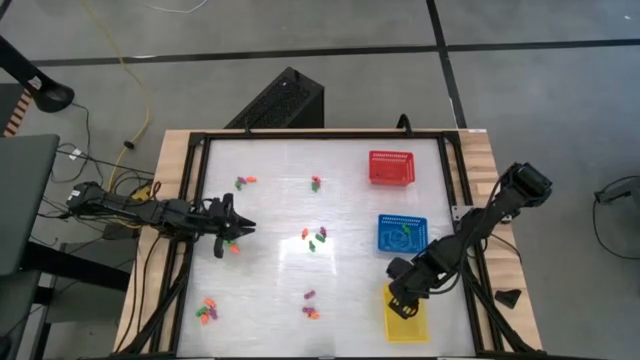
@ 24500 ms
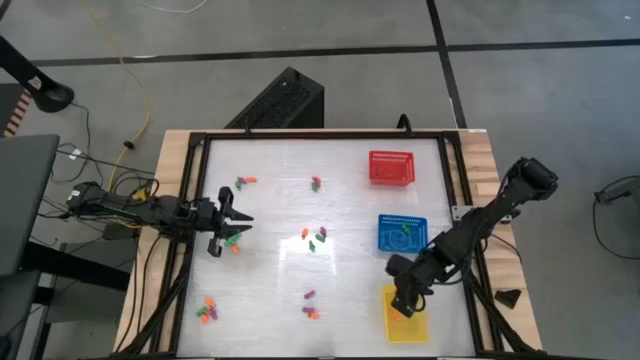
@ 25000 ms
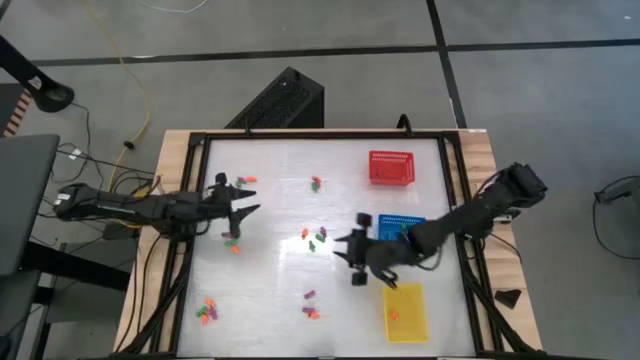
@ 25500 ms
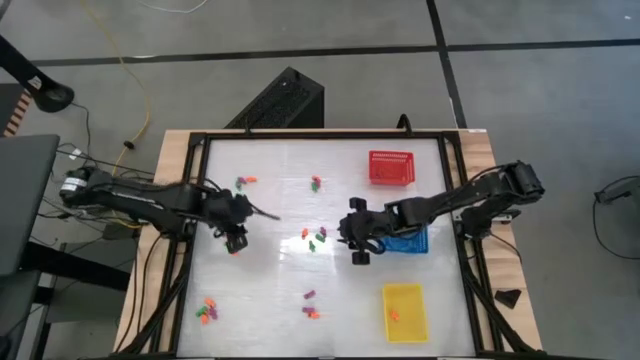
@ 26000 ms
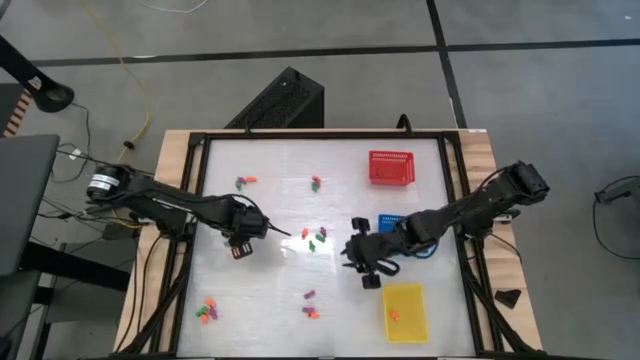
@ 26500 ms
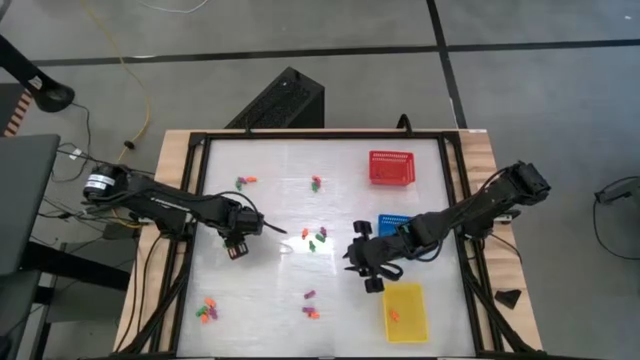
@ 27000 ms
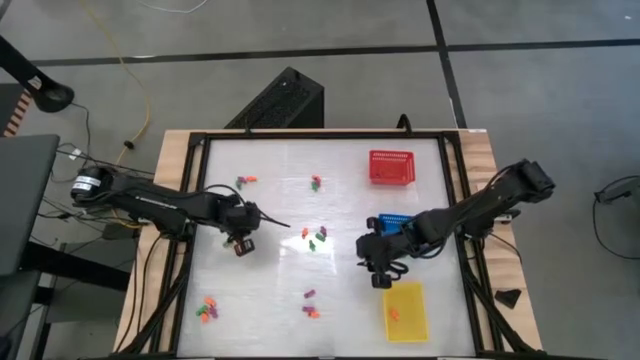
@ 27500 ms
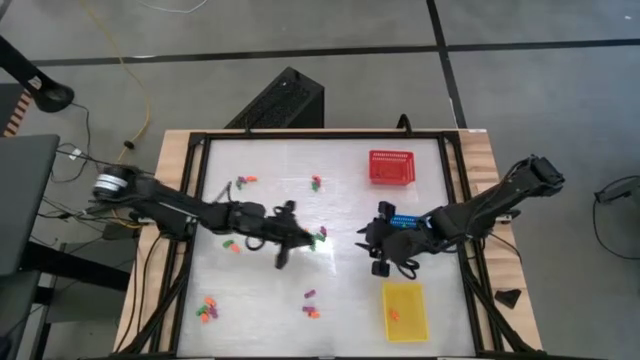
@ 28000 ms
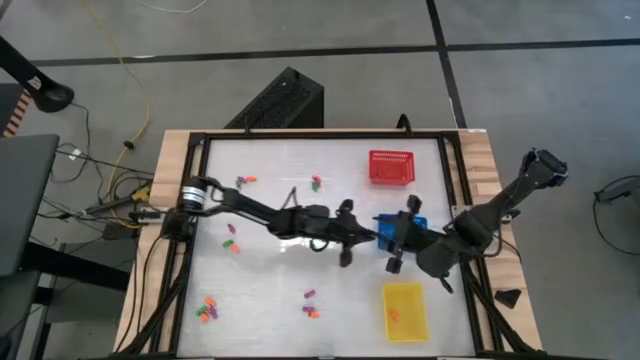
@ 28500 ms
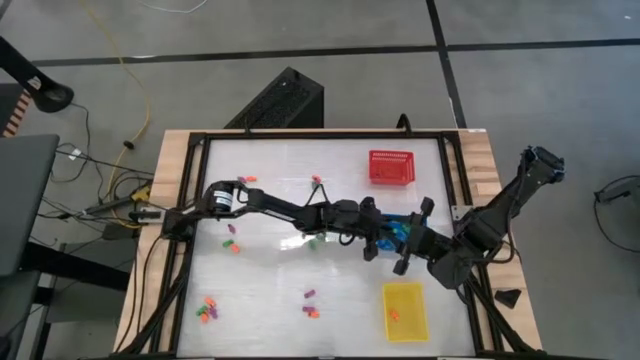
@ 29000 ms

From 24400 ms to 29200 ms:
Task: Sort Halloween decoration
Put the green skeleton toy into the blue basket

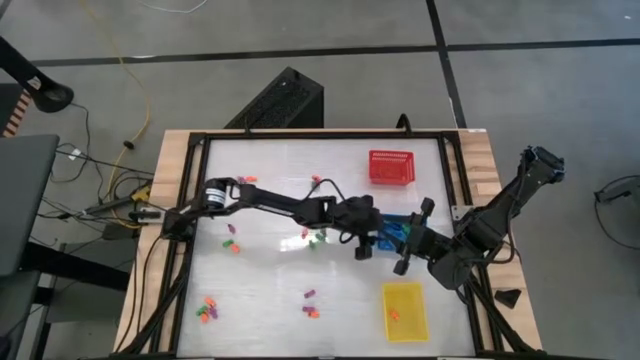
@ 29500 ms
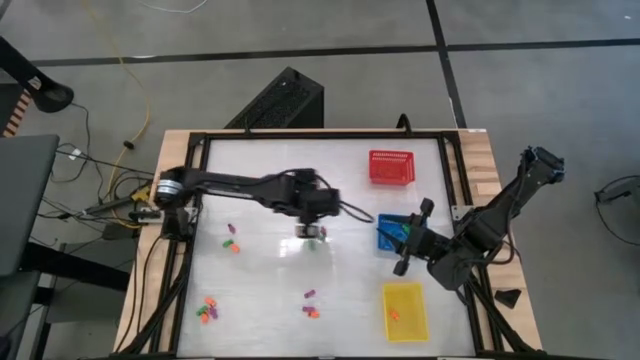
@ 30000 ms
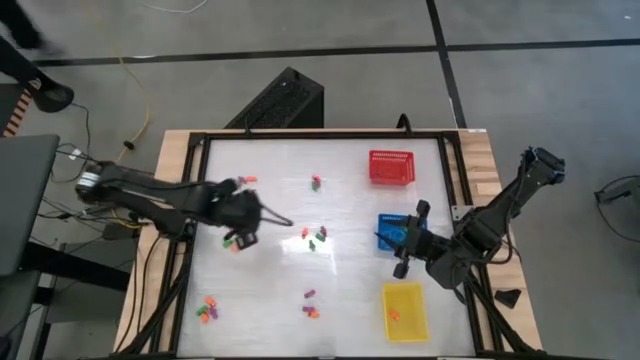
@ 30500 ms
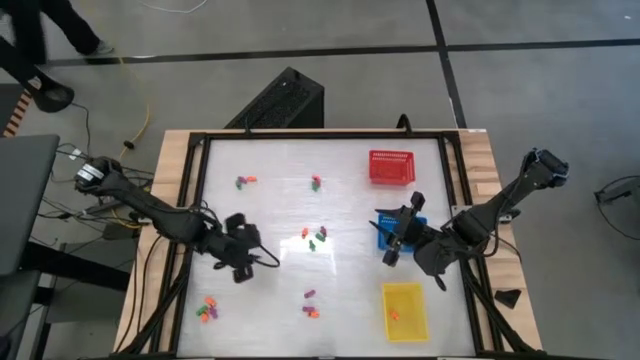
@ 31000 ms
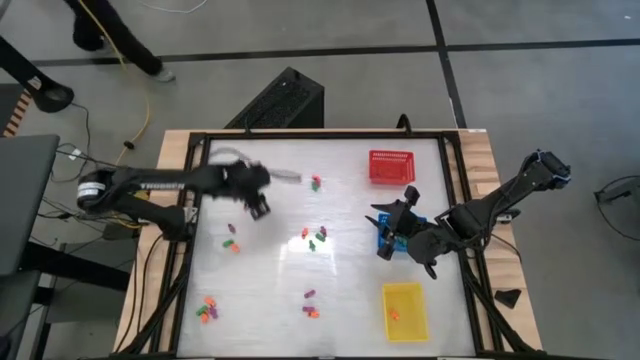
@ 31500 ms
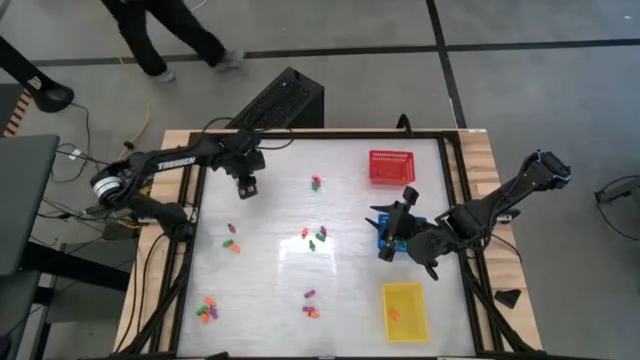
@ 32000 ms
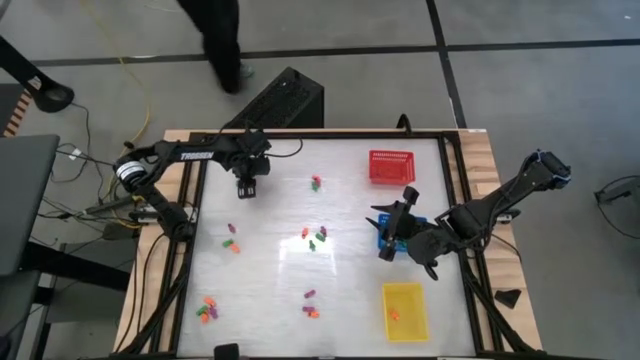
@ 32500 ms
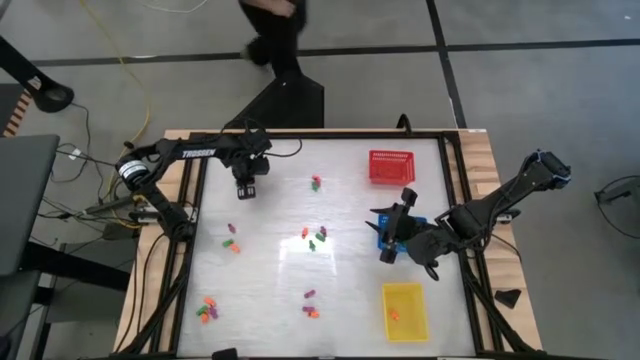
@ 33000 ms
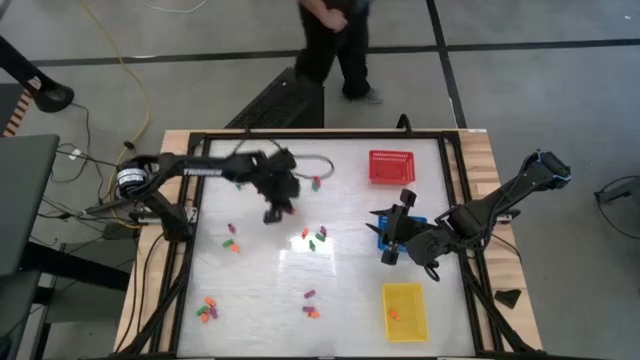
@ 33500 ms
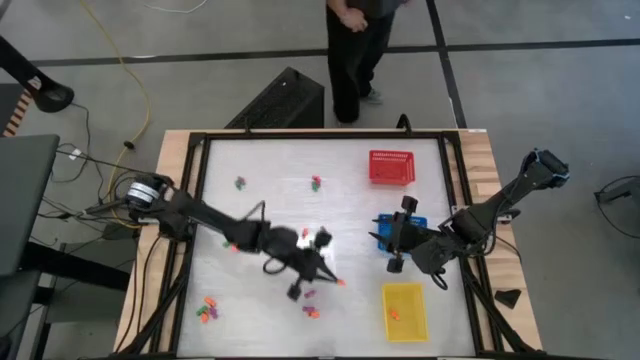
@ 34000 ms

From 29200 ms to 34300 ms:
Put the orange skeleton toy into the yellow basket

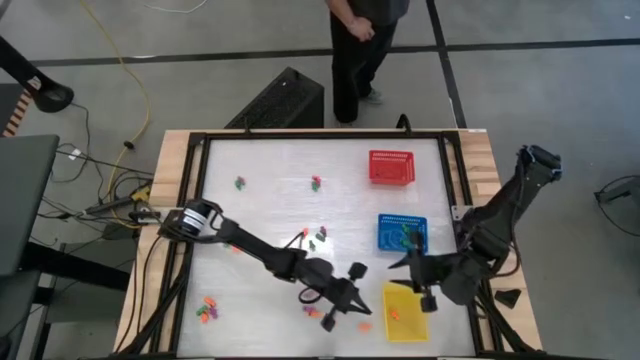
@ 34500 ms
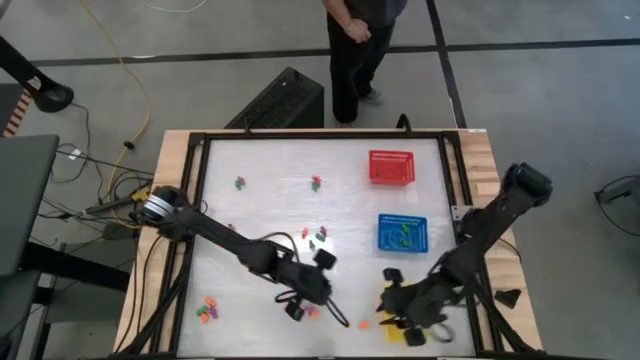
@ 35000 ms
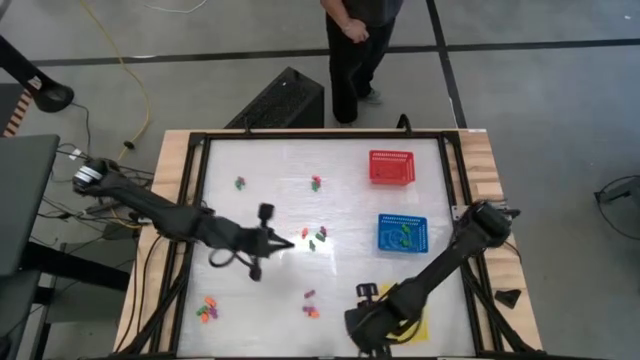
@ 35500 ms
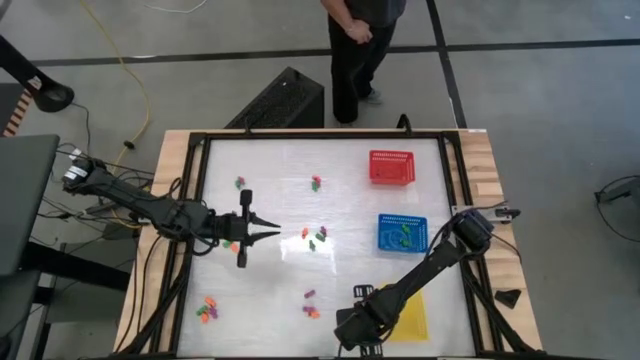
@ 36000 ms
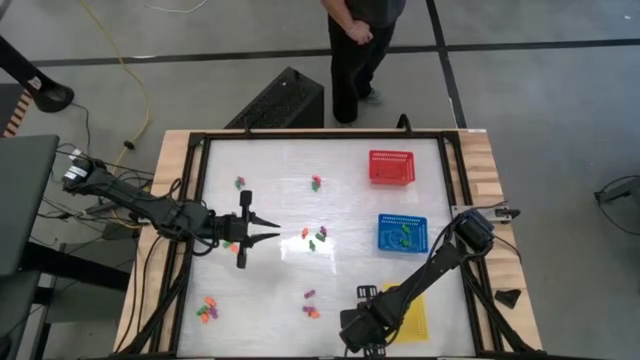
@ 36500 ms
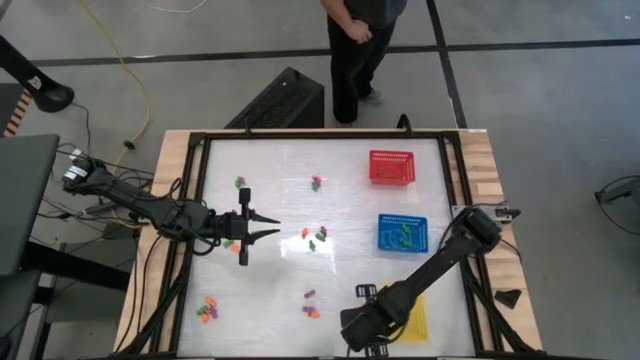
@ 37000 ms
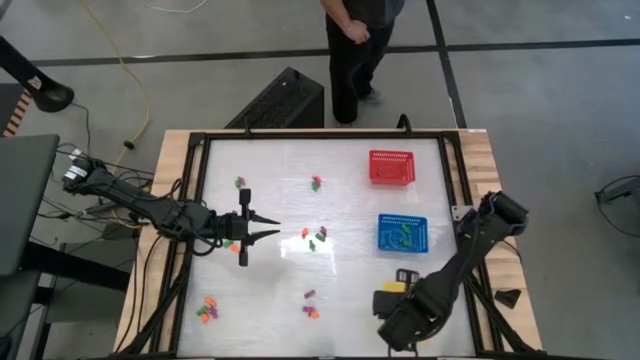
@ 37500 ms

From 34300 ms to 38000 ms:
Put the orange skeleton toy into the yellow basket

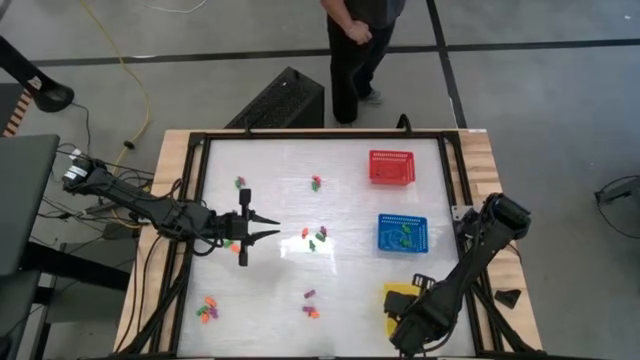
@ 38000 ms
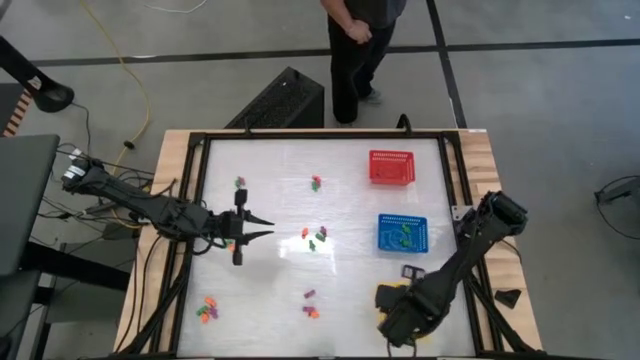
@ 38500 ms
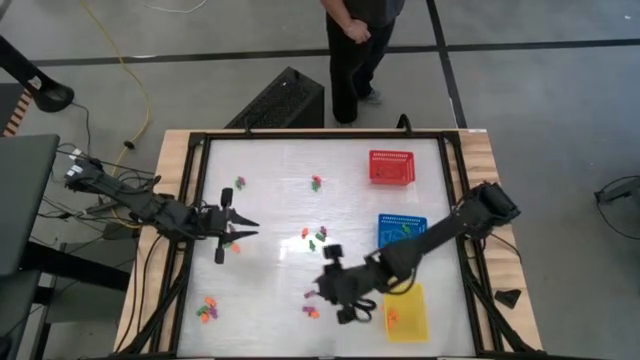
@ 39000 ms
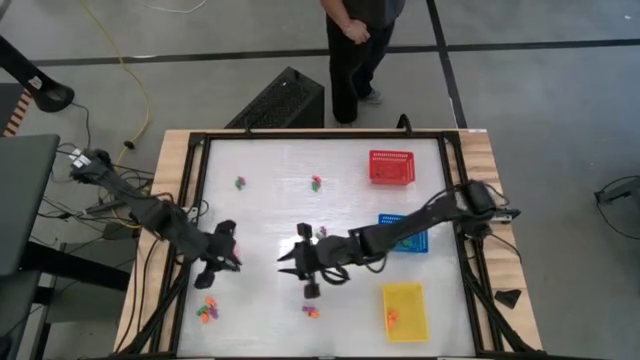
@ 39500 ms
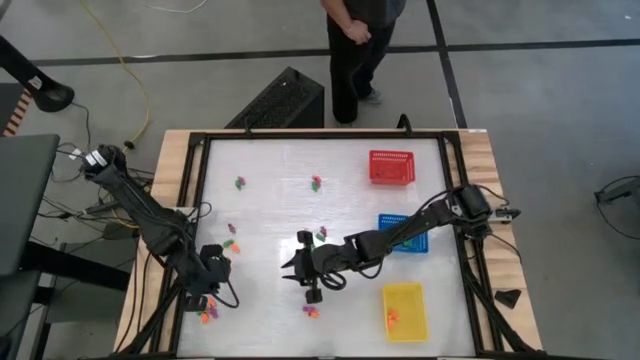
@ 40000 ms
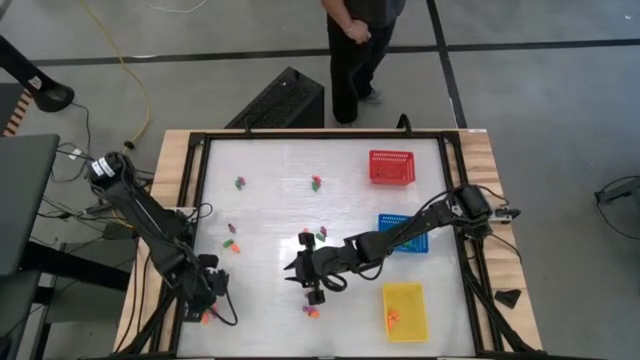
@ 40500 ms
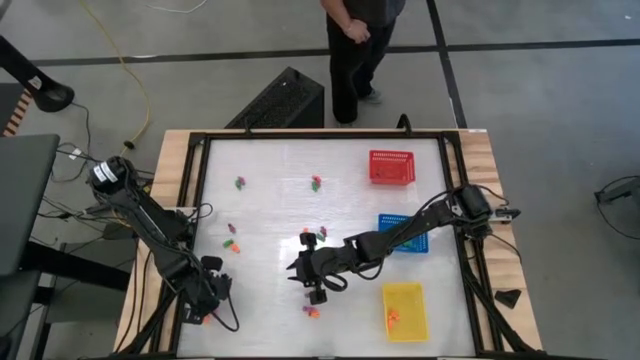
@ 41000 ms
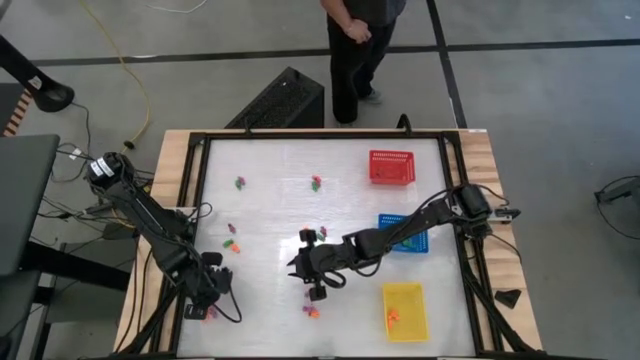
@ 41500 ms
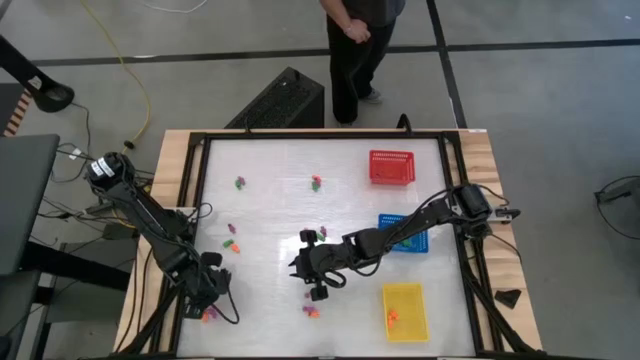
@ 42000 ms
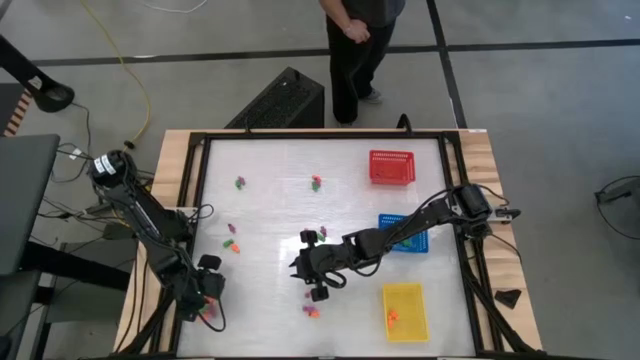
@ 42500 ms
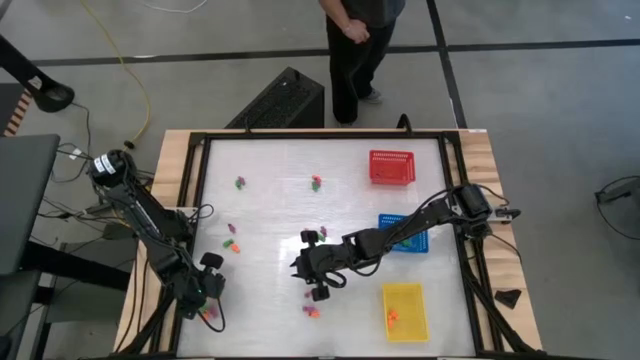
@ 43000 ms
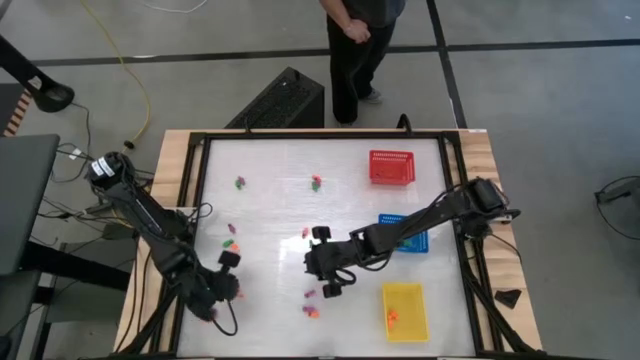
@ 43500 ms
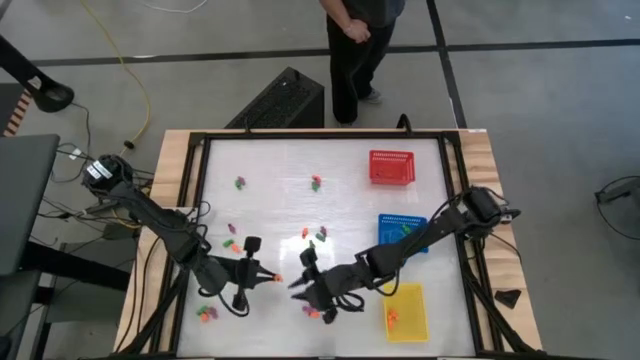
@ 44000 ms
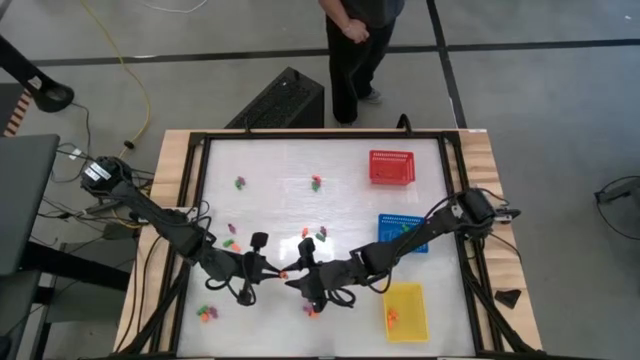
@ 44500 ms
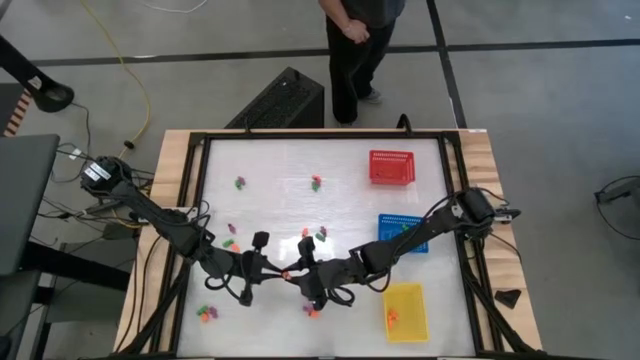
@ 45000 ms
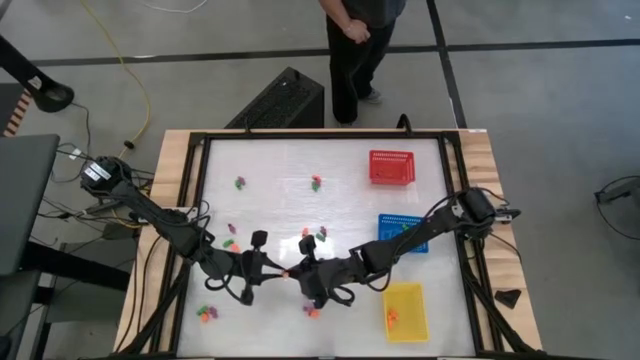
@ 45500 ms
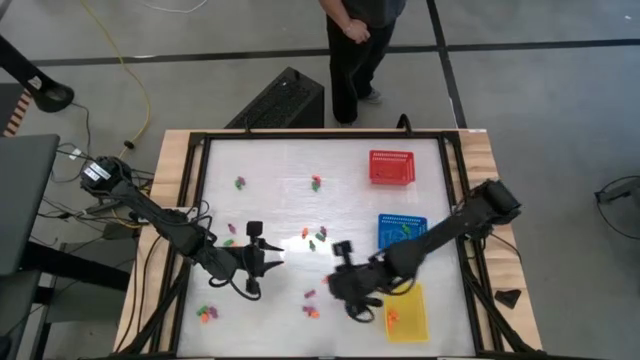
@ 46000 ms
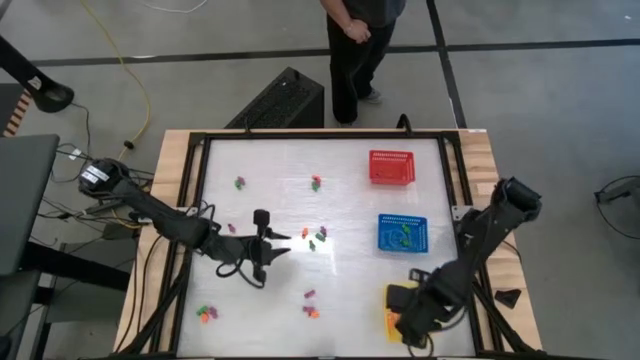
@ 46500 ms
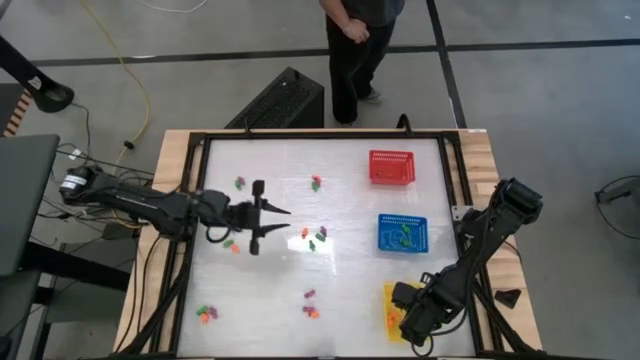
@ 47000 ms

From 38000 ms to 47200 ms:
Put the orange skeleton toy into the yellow basket
